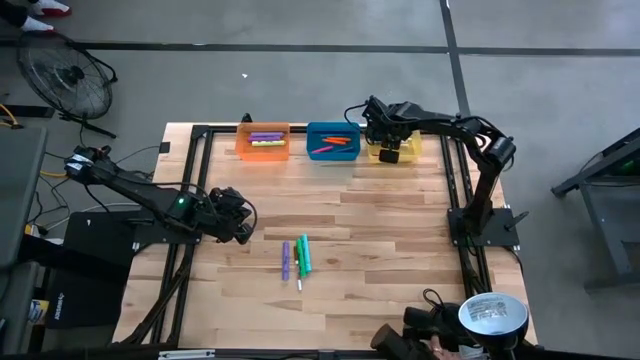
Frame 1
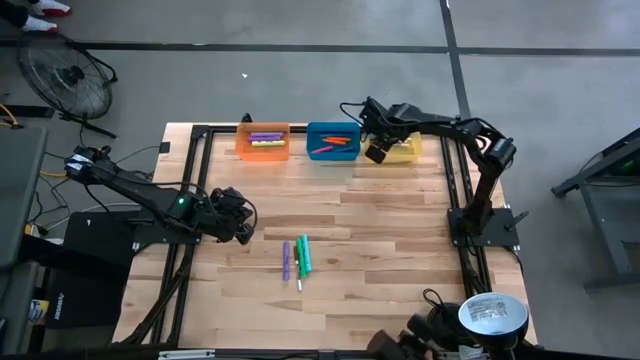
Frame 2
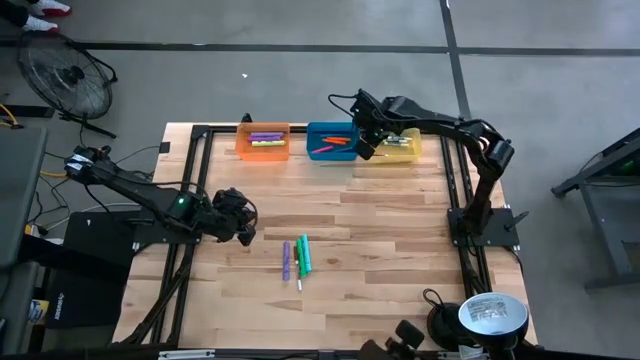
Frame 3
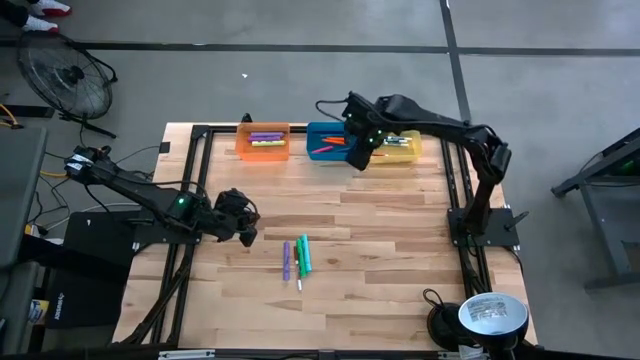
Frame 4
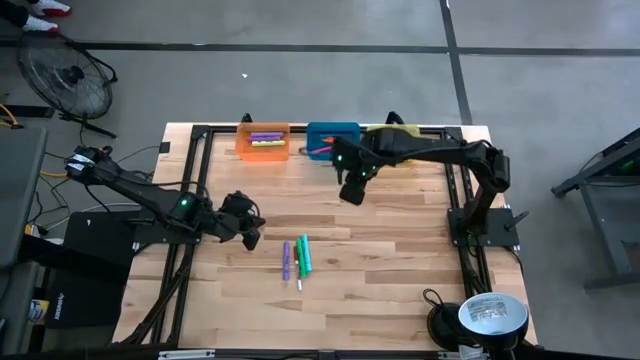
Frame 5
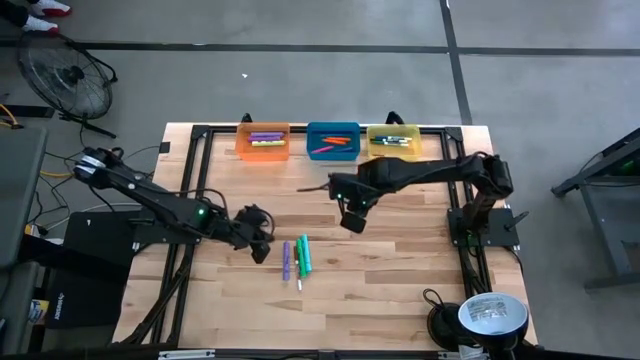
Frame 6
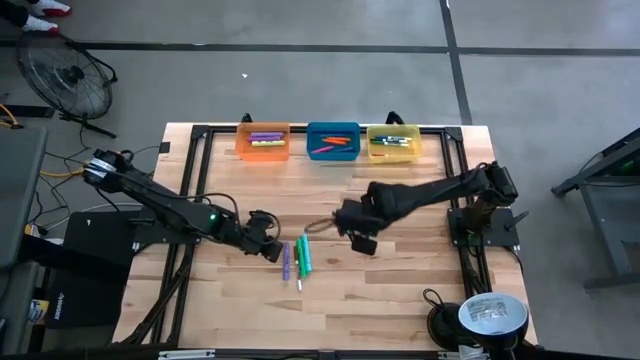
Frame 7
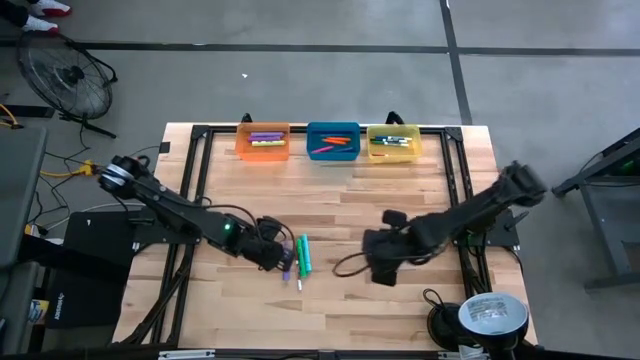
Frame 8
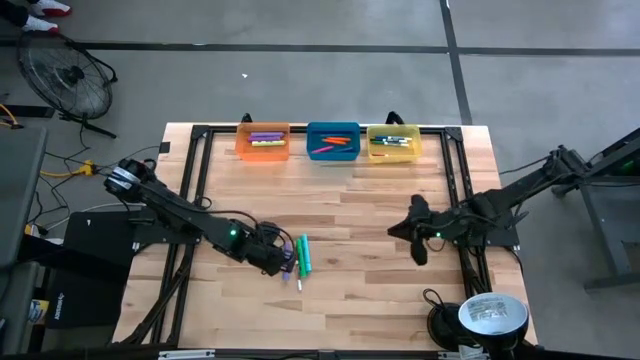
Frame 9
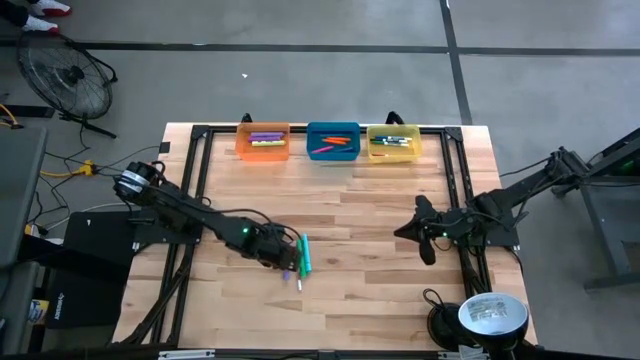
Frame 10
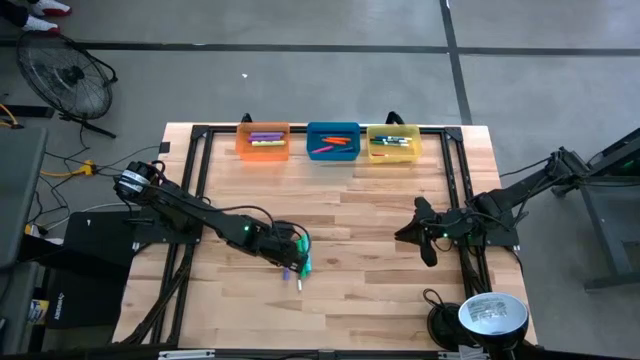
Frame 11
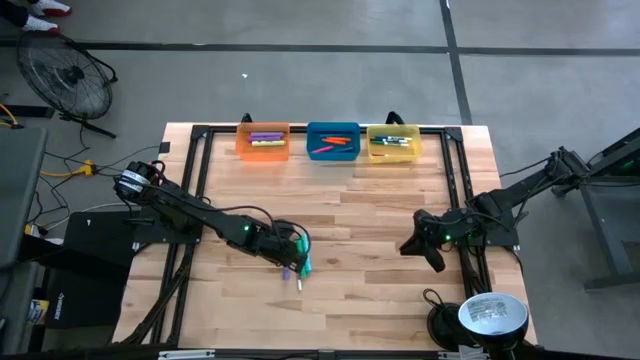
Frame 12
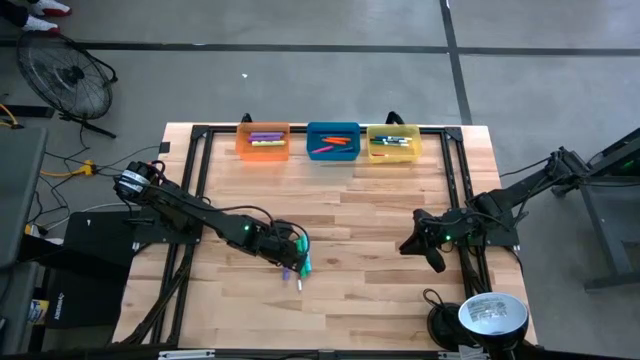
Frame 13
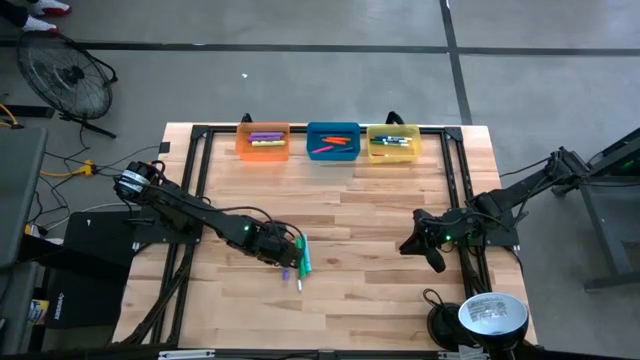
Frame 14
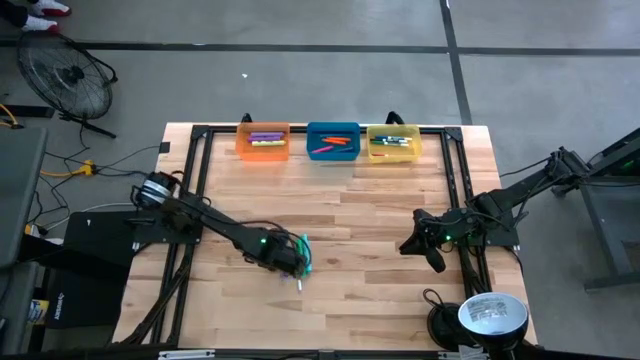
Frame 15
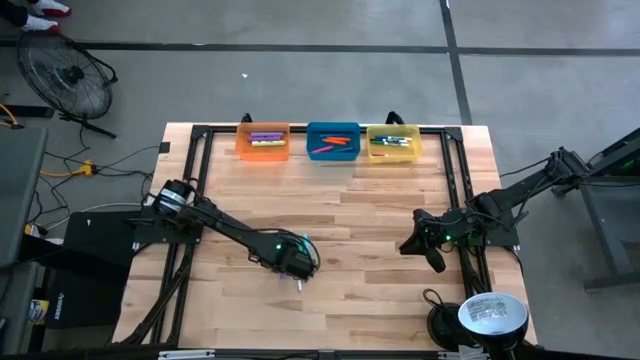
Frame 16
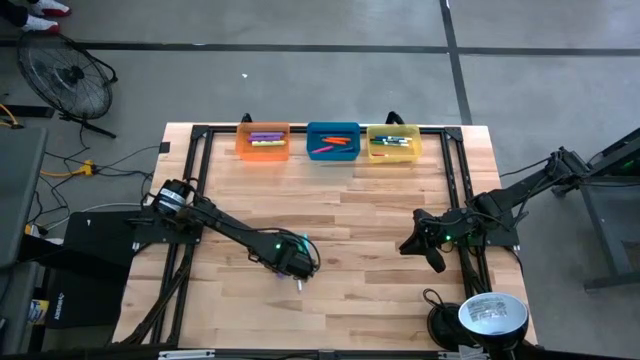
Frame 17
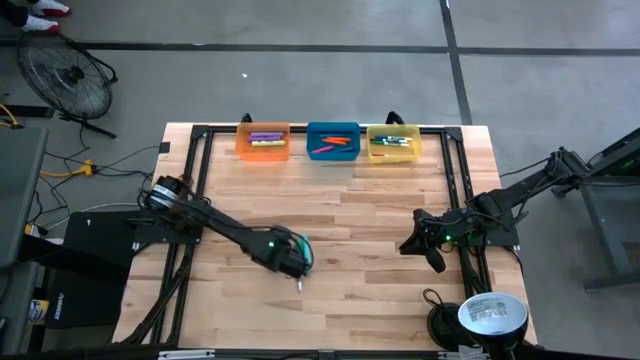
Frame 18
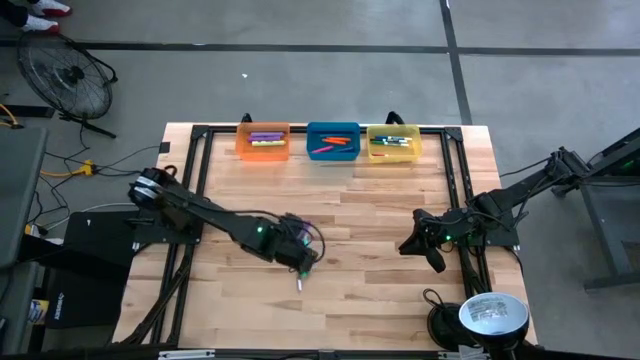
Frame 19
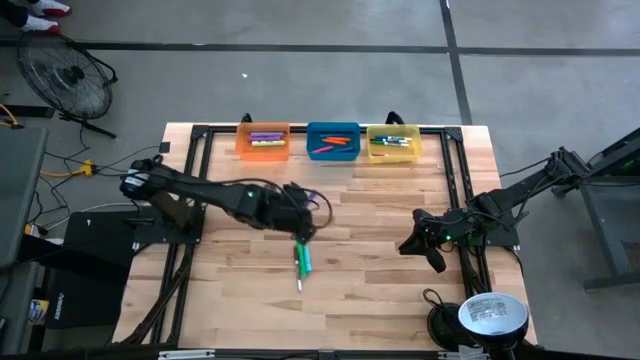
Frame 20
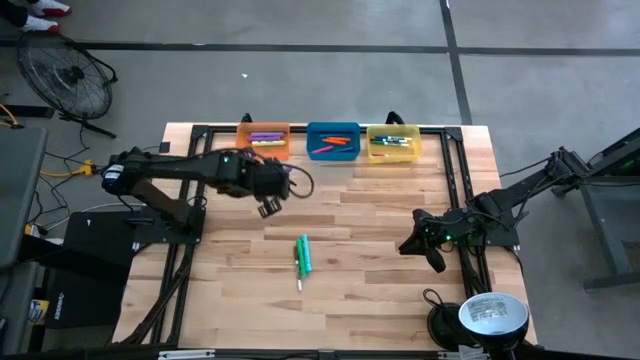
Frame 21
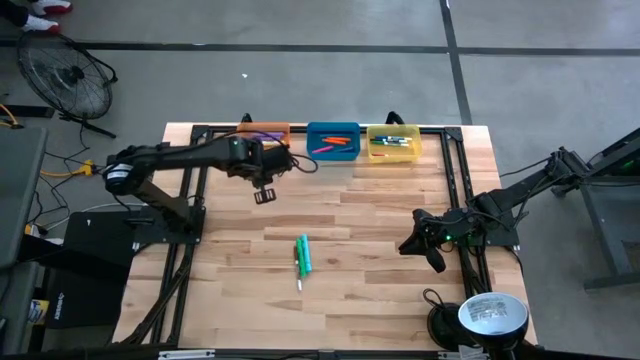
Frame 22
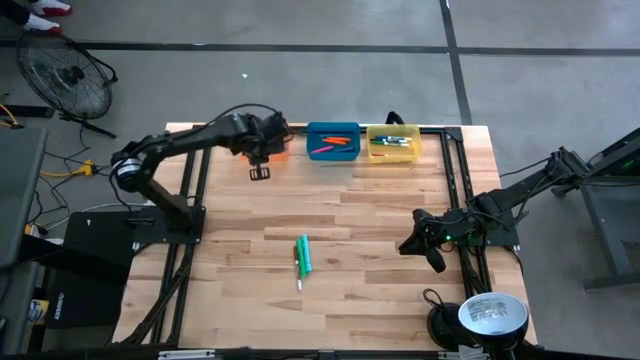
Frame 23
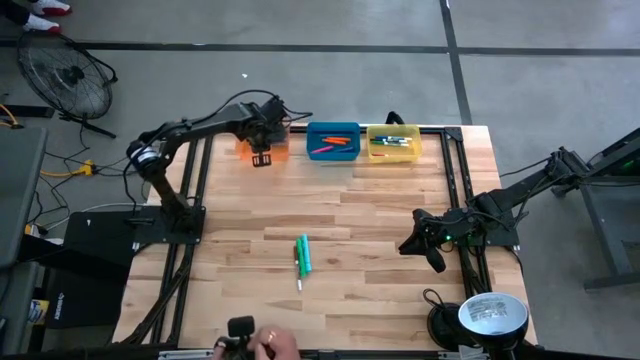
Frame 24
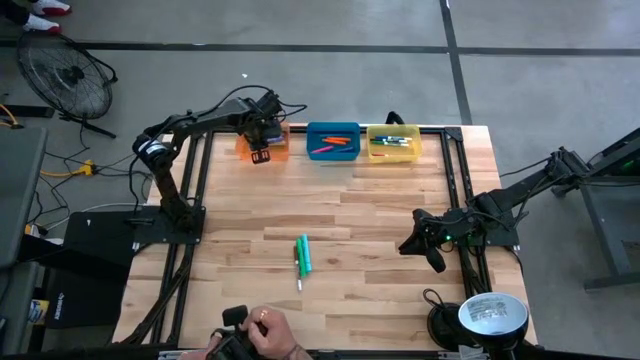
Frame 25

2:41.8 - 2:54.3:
Task: Pick & Place Markers
Put the light violet highlighter into the orange bin

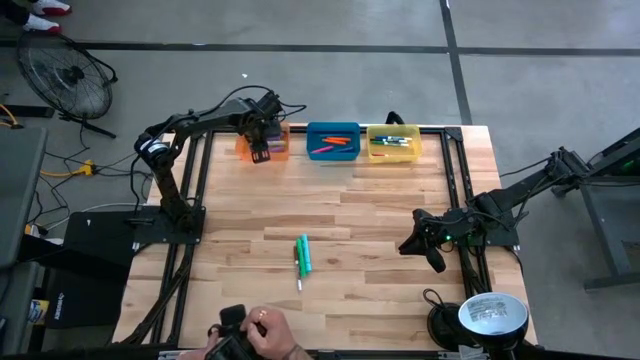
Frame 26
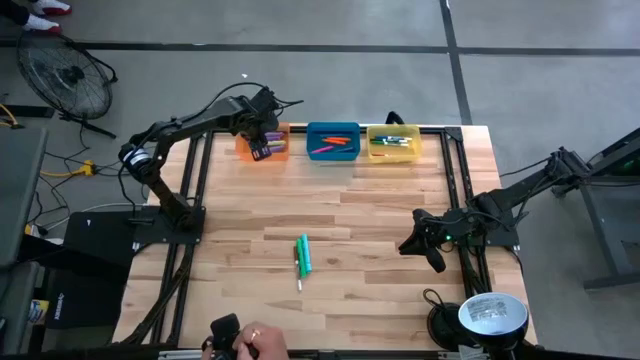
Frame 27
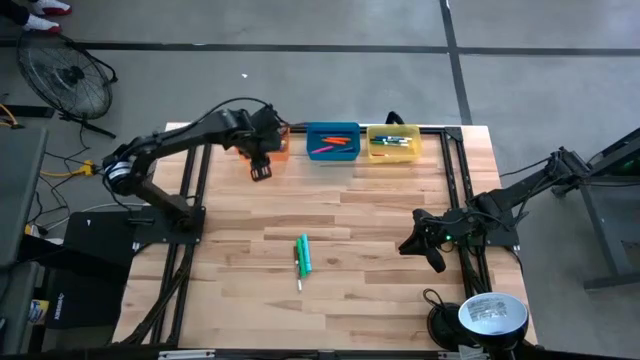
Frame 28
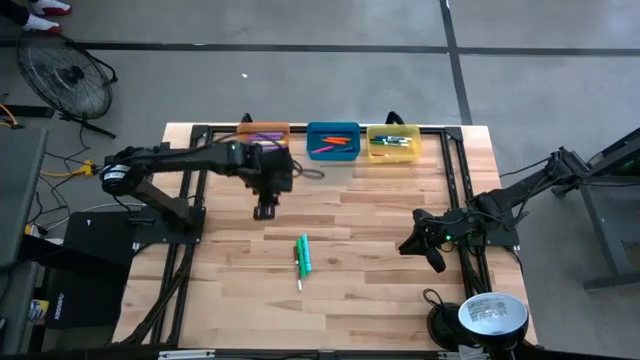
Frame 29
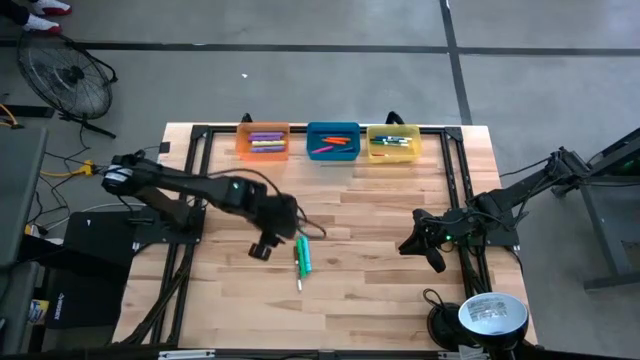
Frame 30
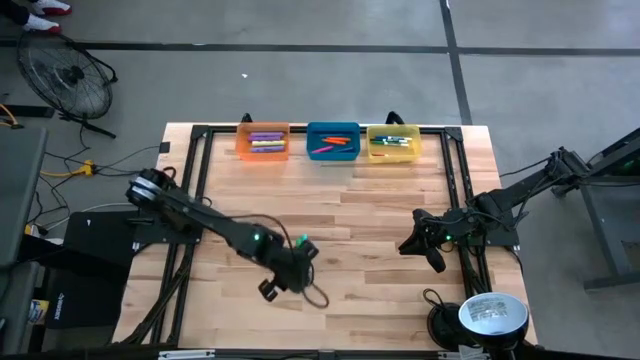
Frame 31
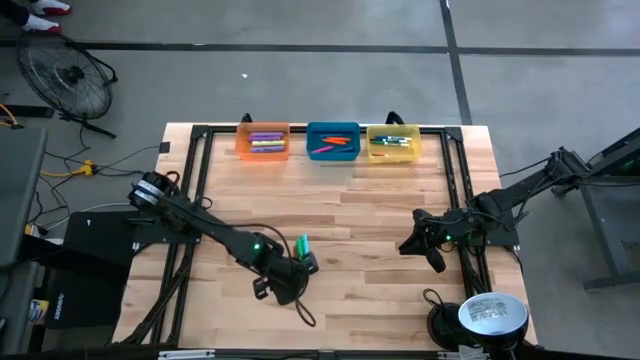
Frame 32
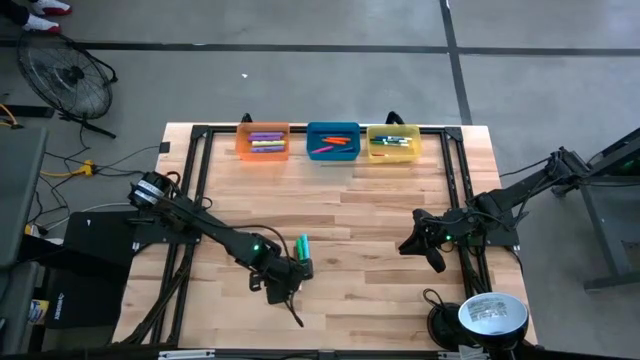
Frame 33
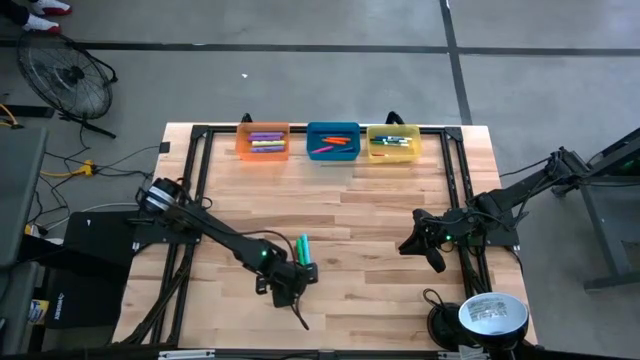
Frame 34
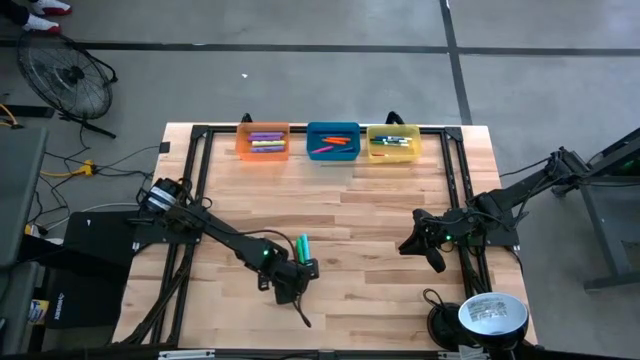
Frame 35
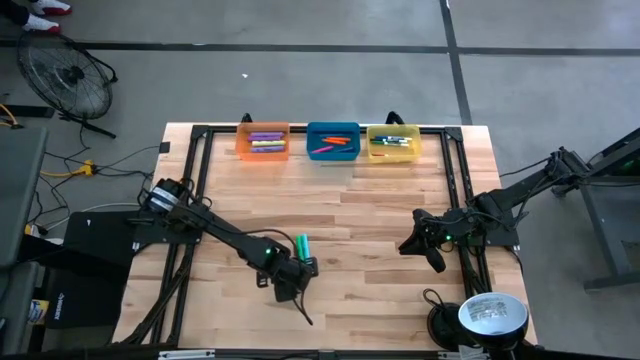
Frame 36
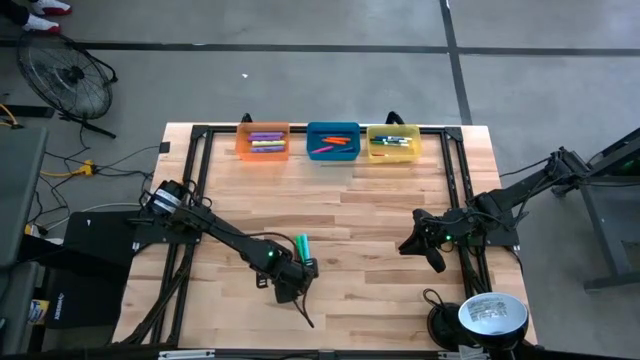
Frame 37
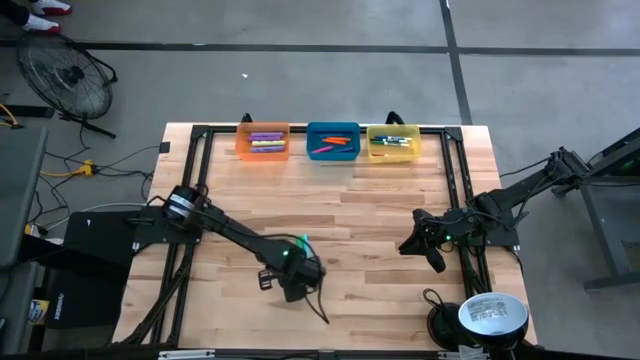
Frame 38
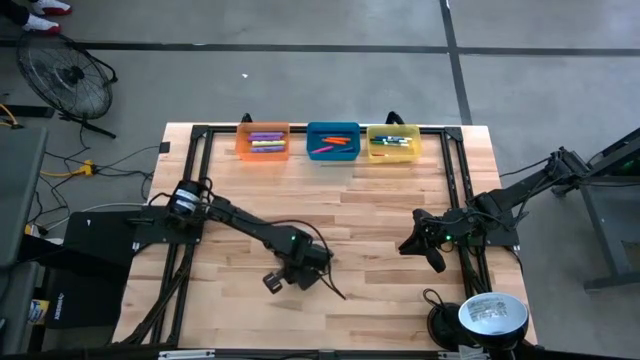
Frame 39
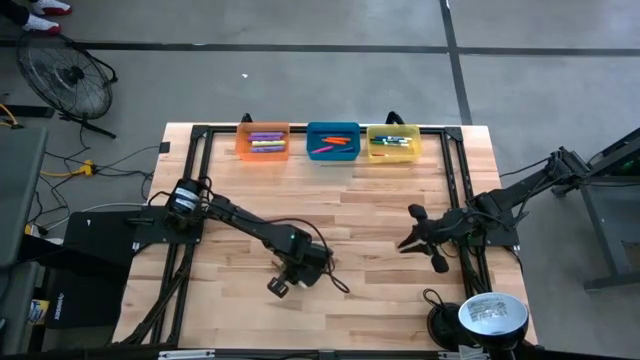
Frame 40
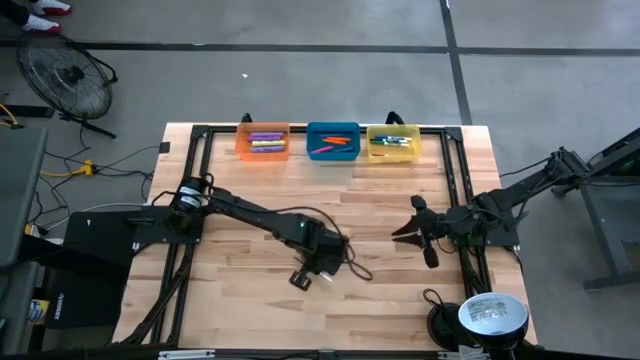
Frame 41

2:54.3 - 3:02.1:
Put the brown marker into the yellow bin

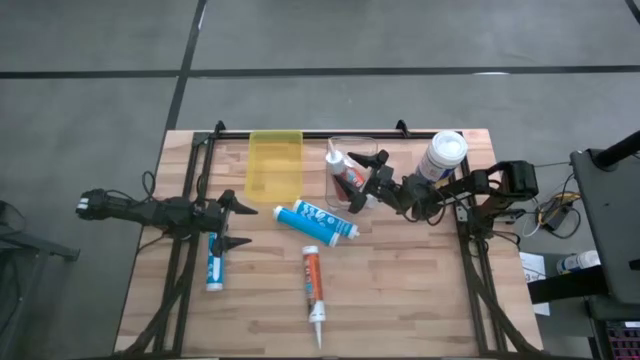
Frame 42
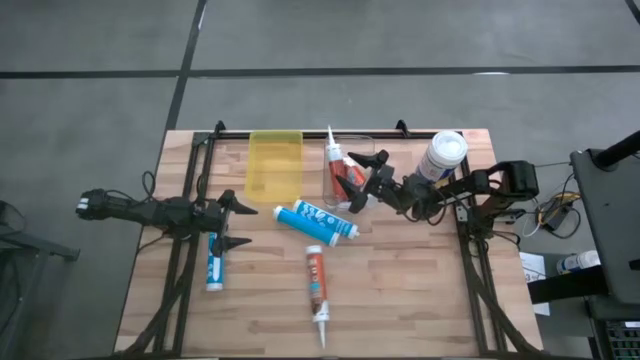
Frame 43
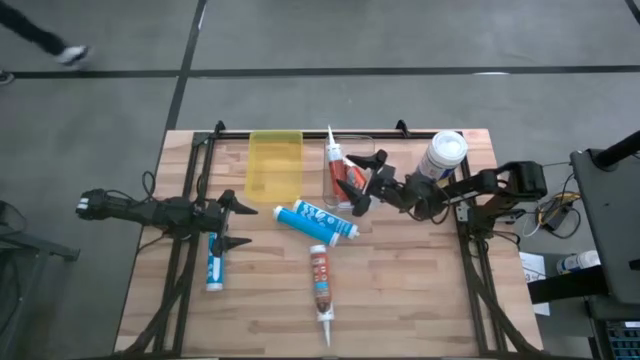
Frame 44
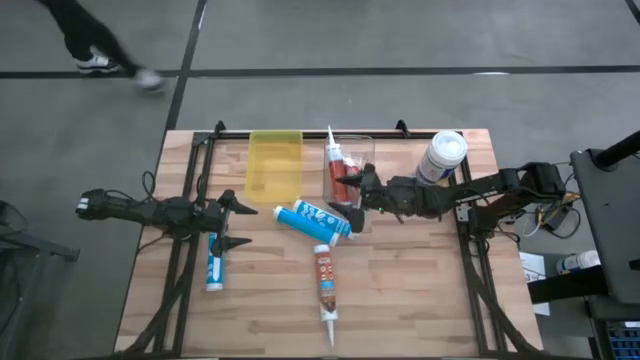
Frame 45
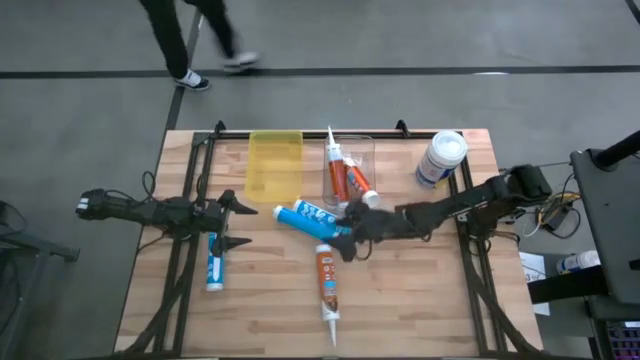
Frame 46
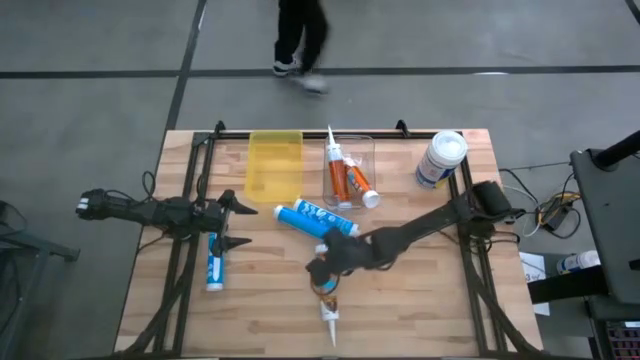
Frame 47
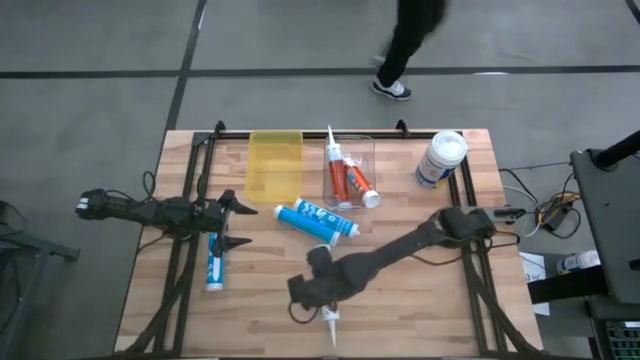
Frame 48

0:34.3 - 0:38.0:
Task: Pick & place silicon tubes, Sealant and Lysol wipes
Put the orange sealant into the transparent bin
